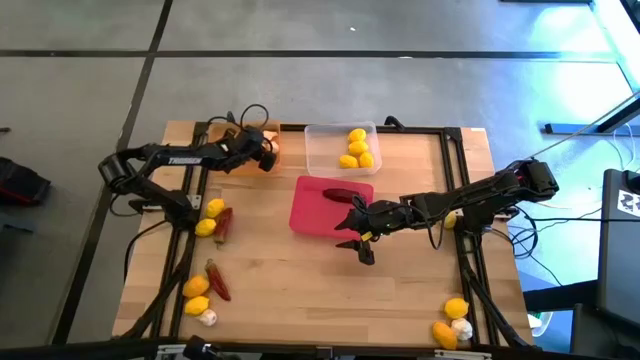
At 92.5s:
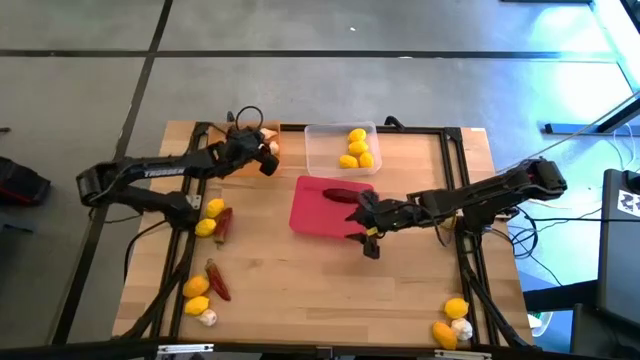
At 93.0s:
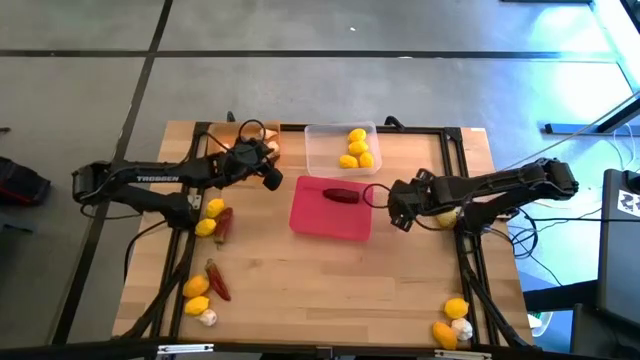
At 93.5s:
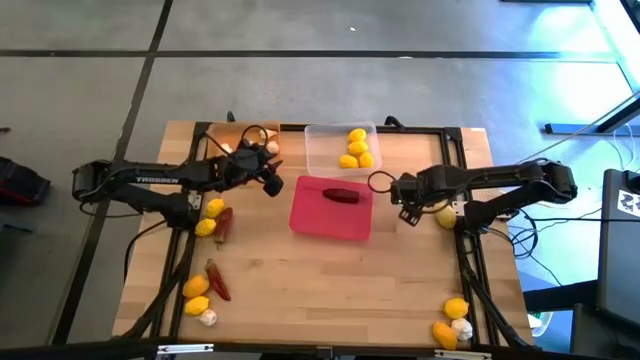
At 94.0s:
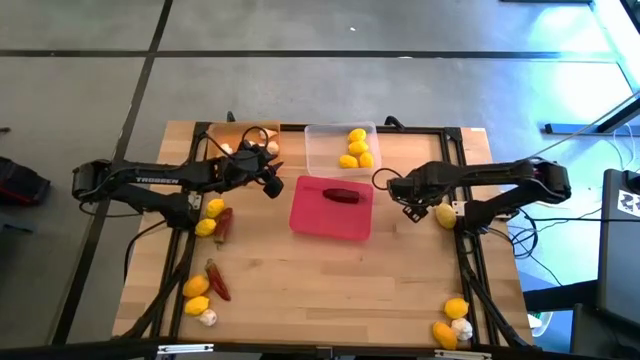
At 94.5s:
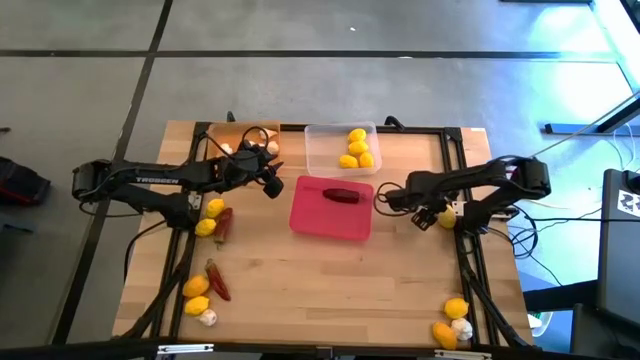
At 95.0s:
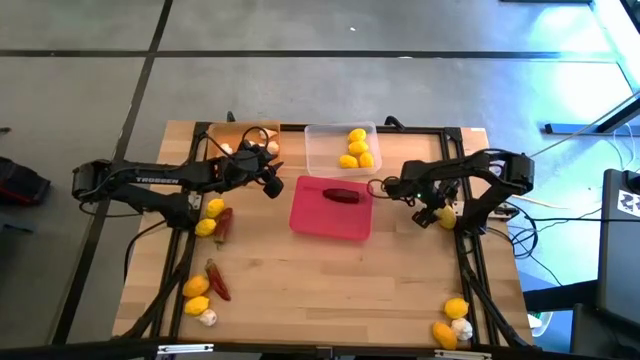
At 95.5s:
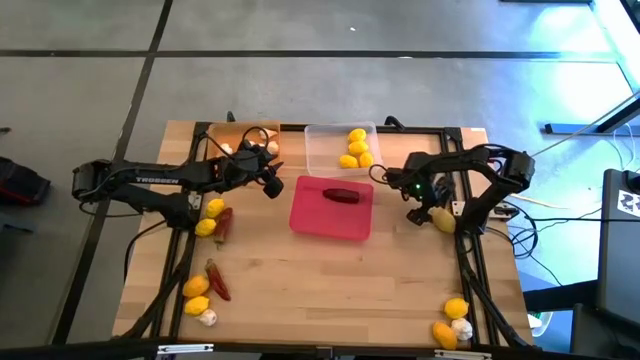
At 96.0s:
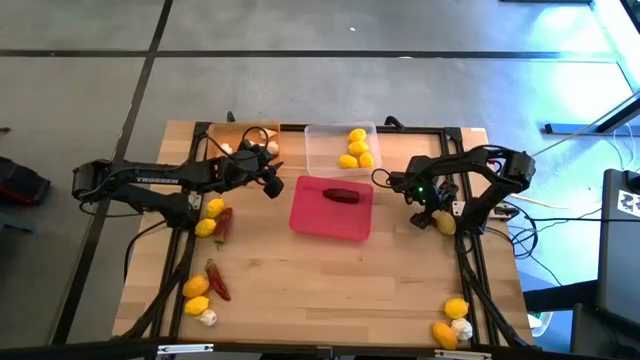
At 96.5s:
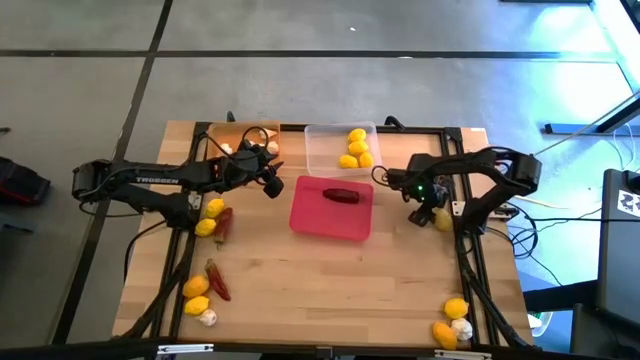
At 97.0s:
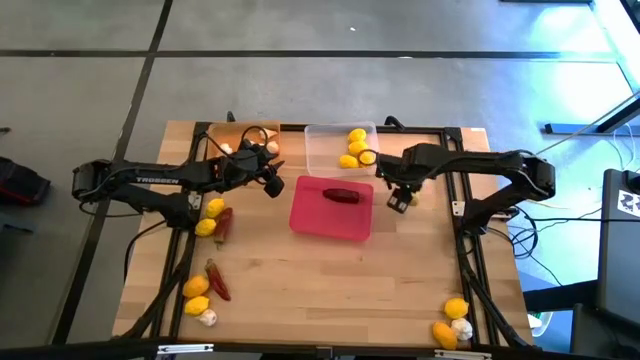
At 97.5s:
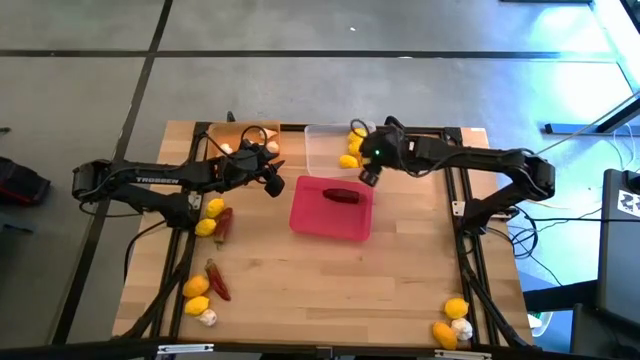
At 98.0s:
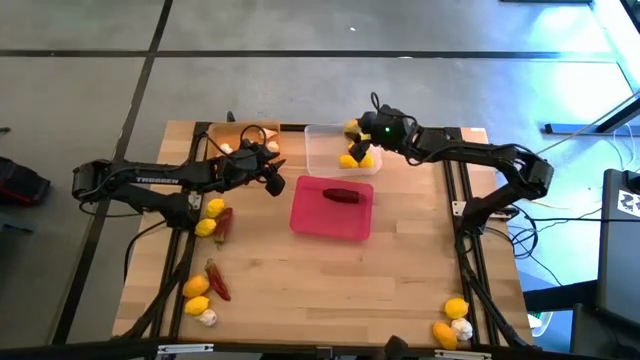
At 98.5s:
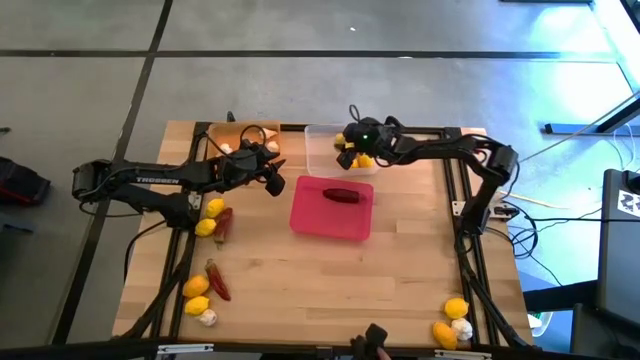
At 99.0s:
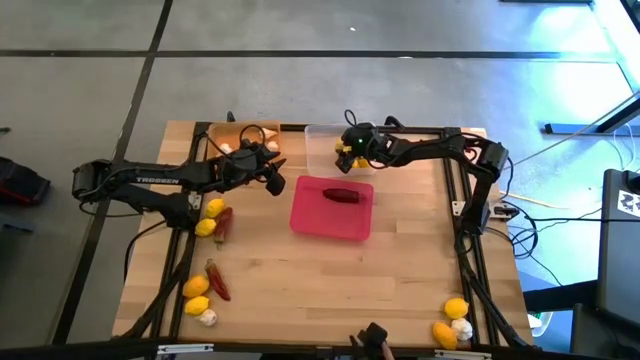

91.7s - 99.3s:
Task: Sort produce into baskets
Put the yellow lemon in the transparent bin

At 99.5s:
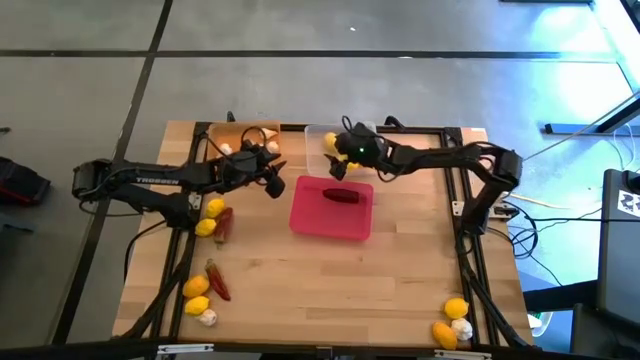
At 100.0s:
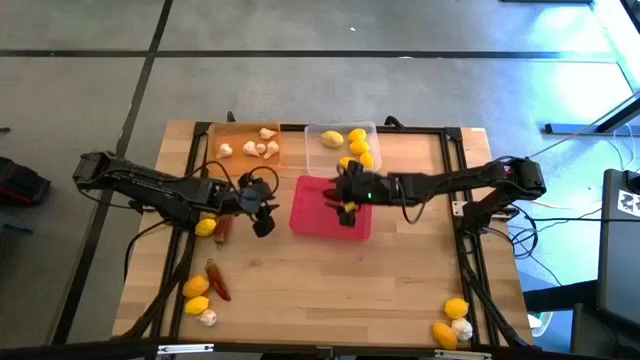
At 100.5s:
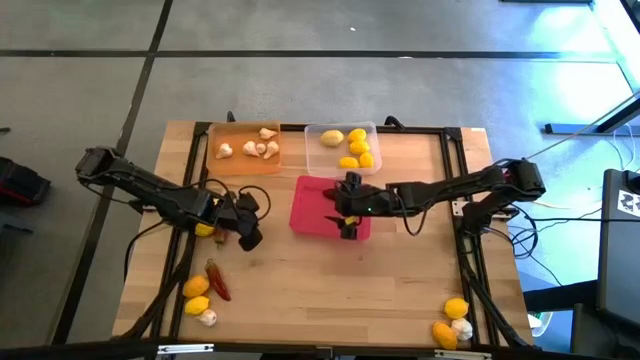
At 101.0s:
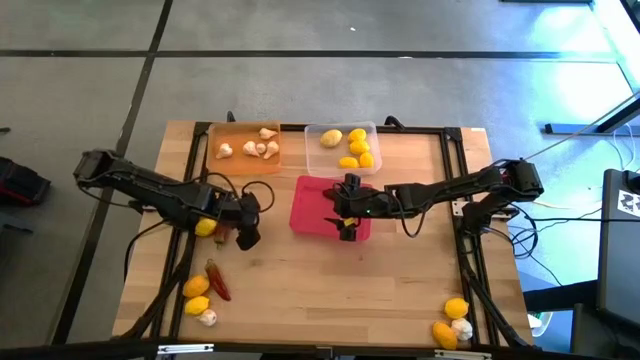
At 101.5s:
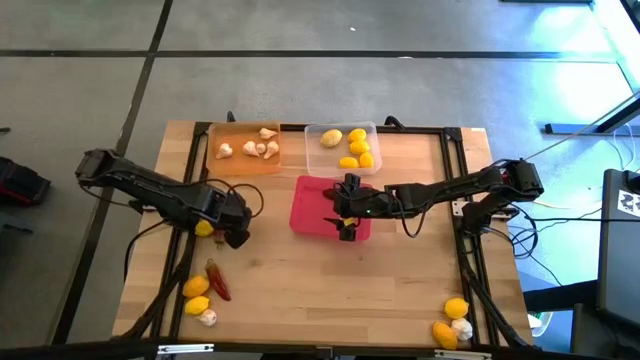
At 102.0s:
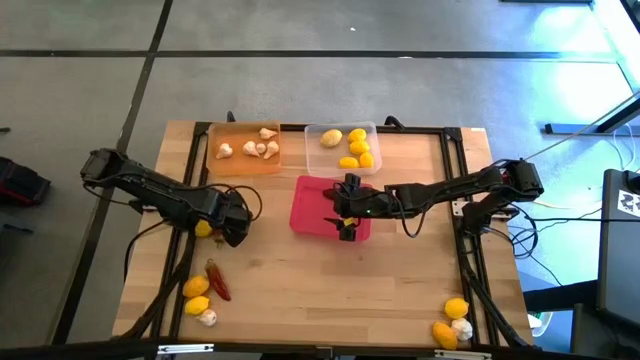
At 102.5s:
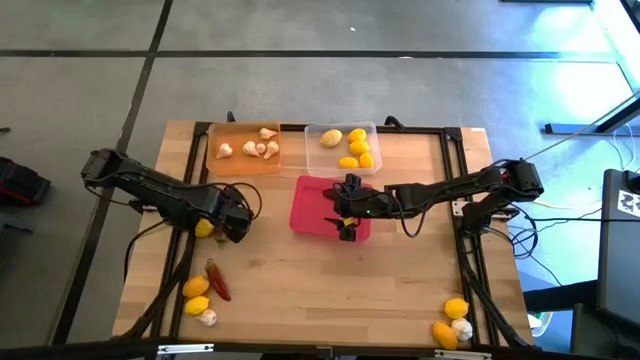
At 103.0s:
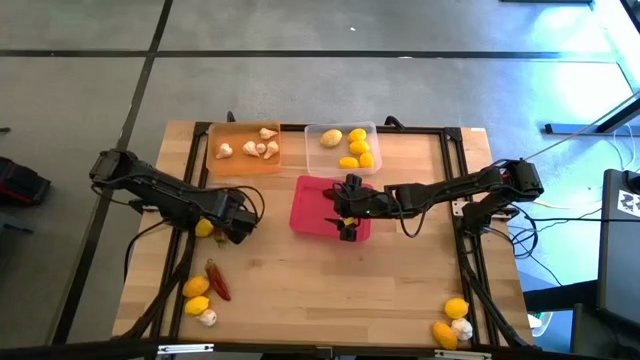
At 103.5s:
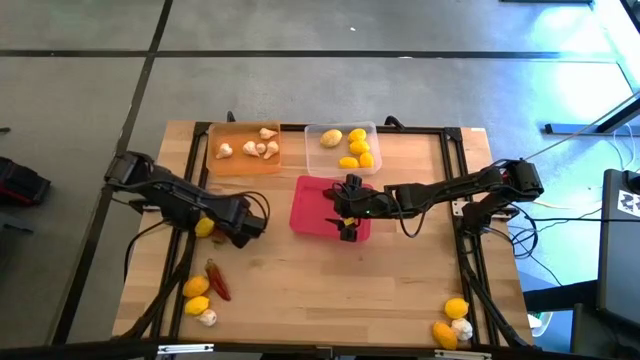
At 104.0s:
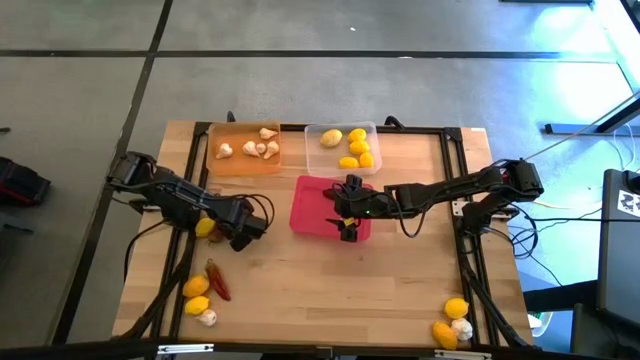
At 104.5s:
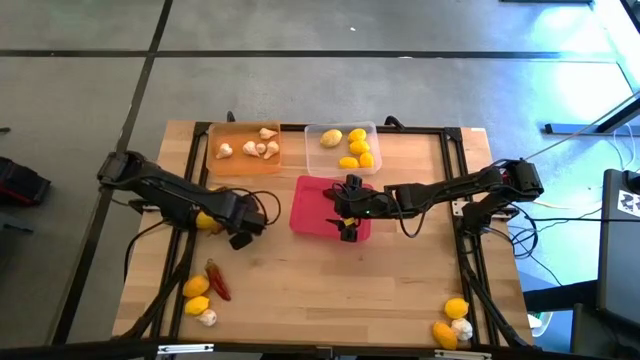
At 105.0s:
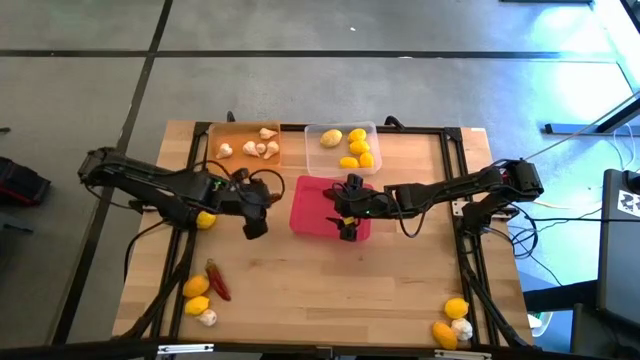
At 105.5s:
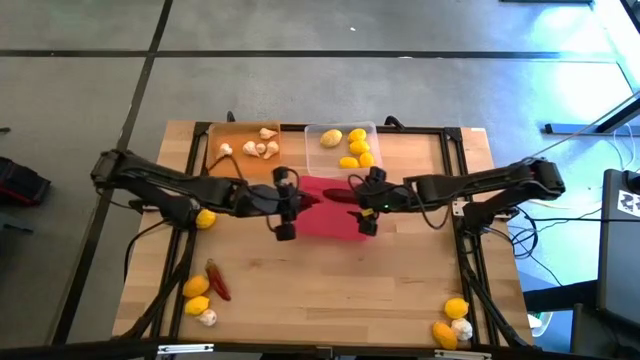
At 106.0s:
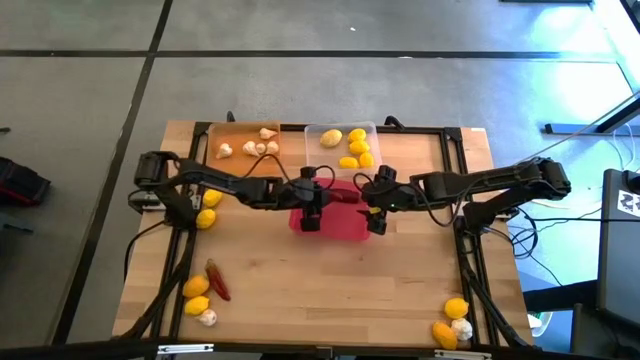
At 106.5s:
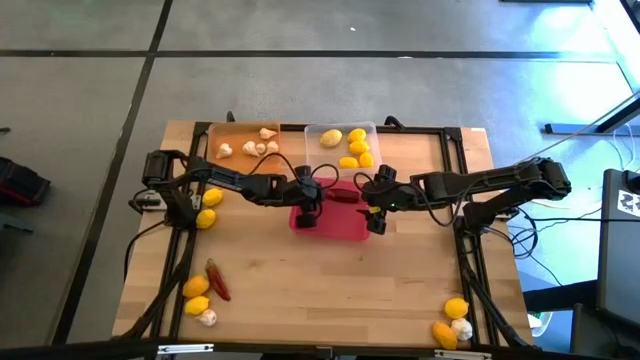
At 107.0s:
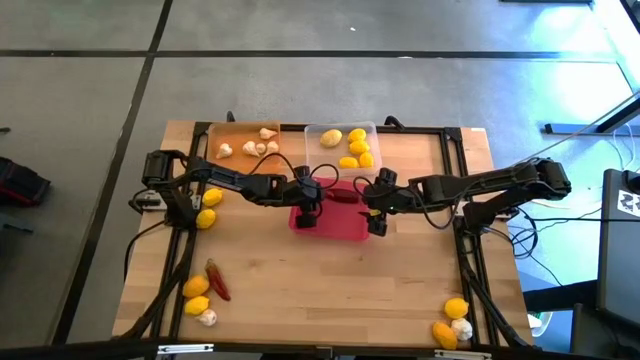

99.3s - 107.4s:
Put the red chili pepper in the red bin

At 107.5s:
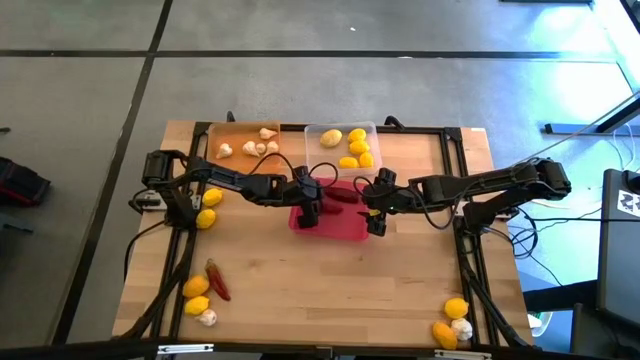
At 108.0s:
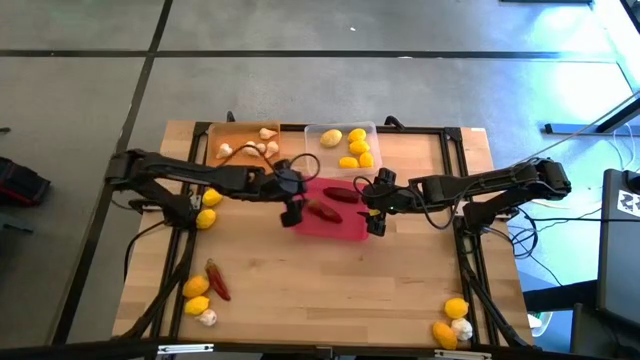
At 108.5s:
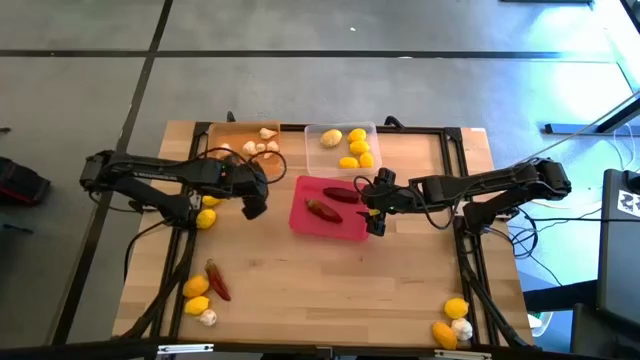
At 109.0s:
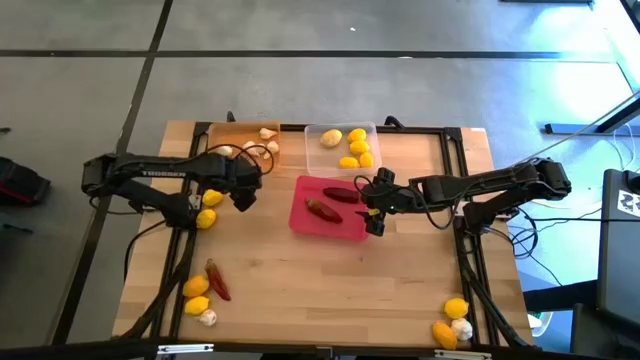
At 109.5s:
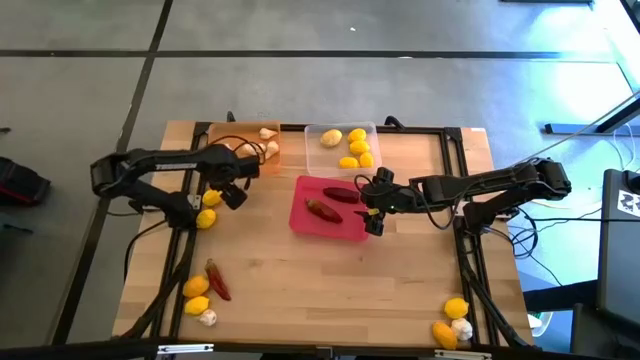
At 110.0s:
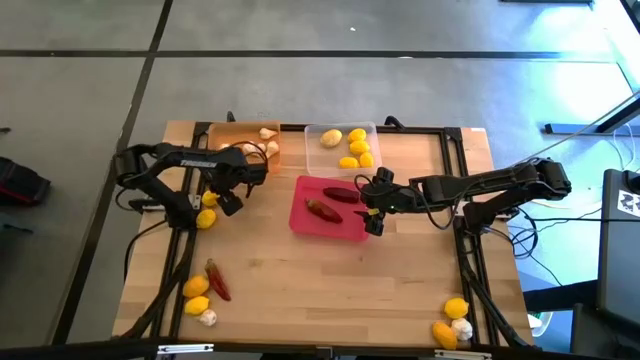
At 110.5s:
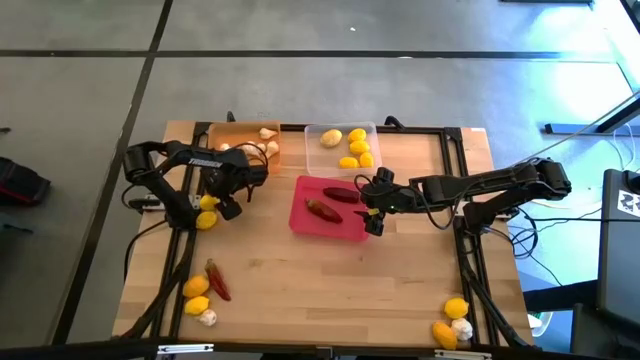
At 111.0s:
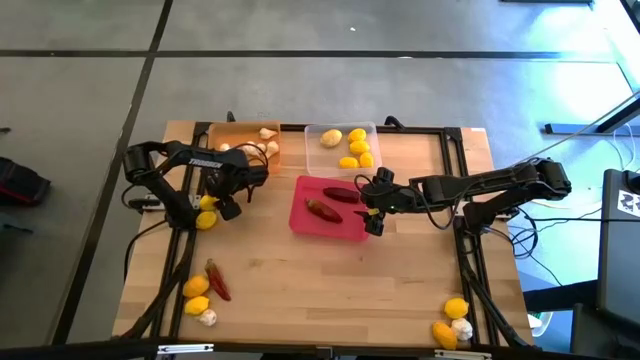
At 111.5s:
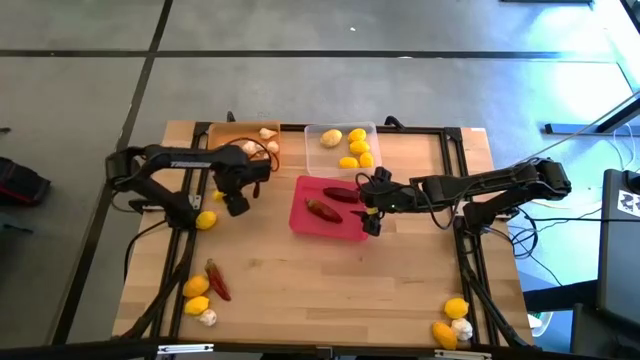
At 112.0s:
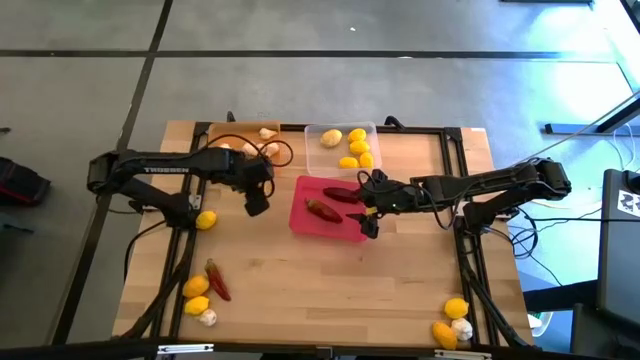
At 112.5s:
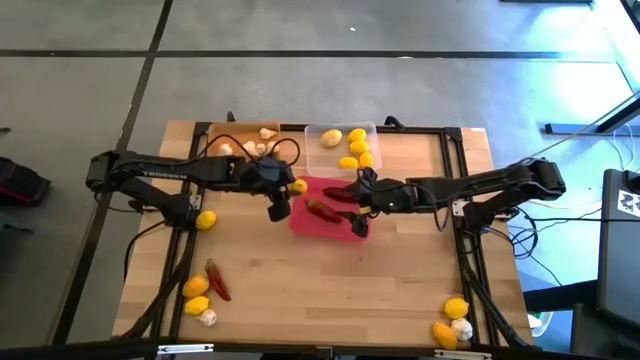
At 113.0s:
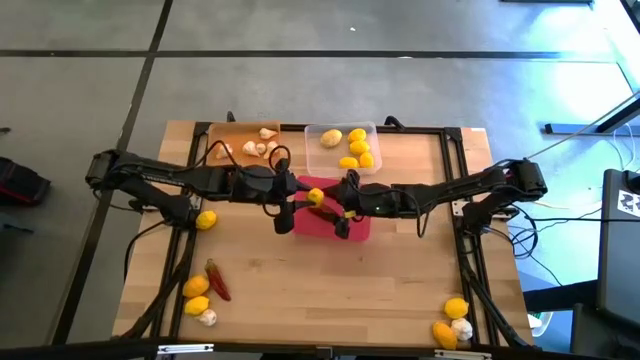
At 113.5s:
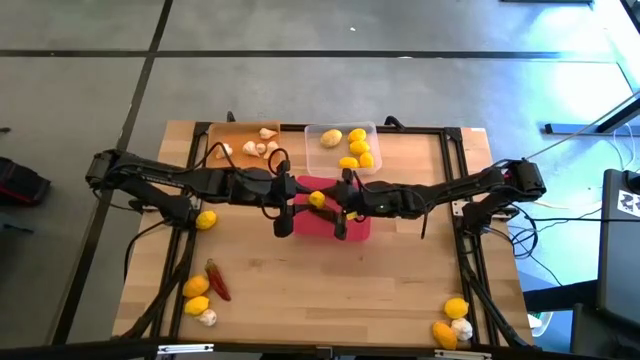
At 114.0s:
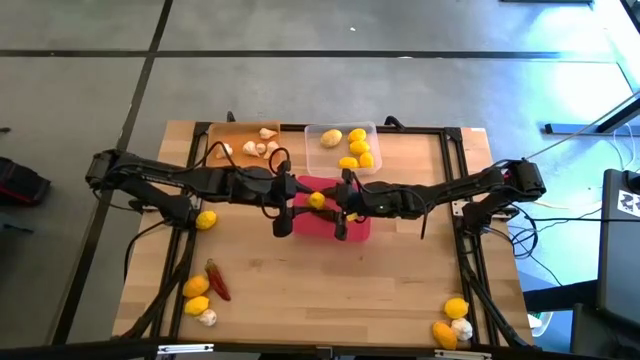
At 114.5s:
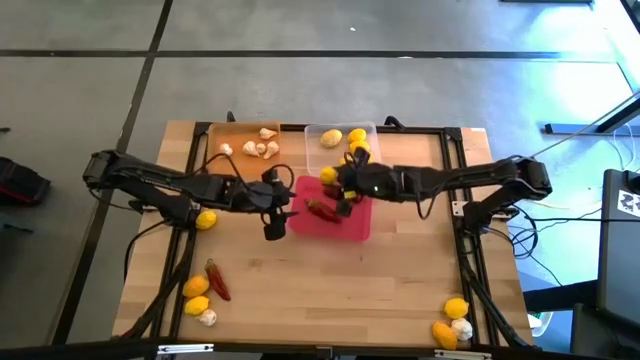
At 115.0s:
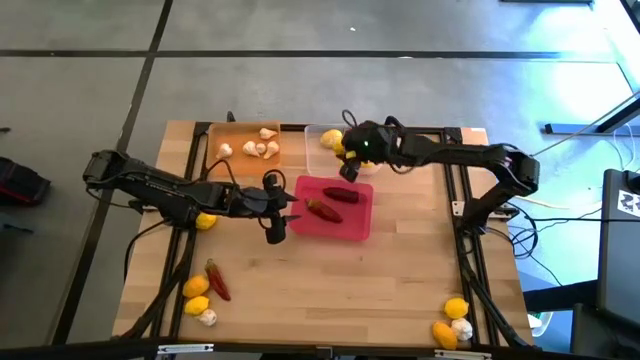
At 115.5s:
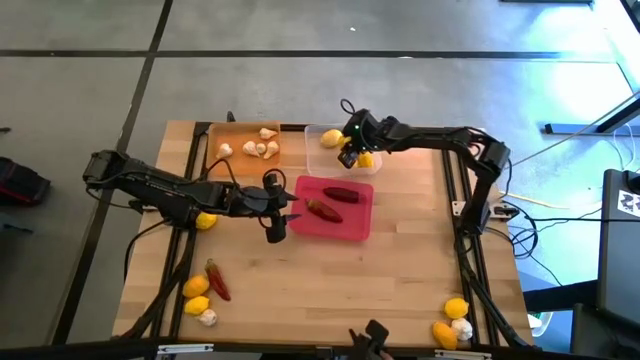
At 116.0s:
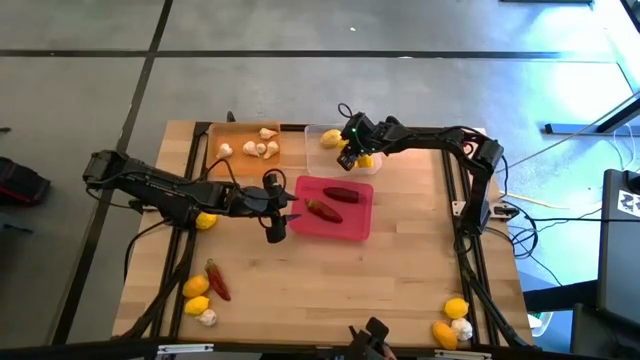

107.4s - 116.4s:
Put the yellow lemon in the transparent bin
